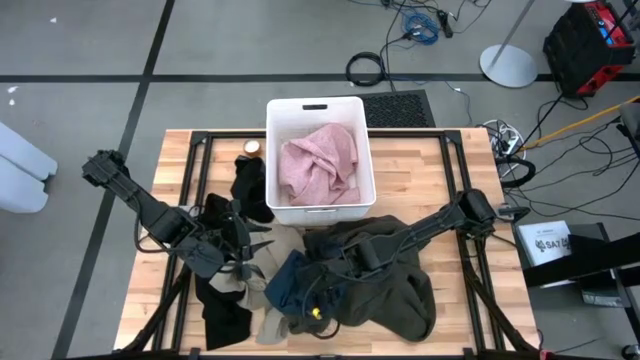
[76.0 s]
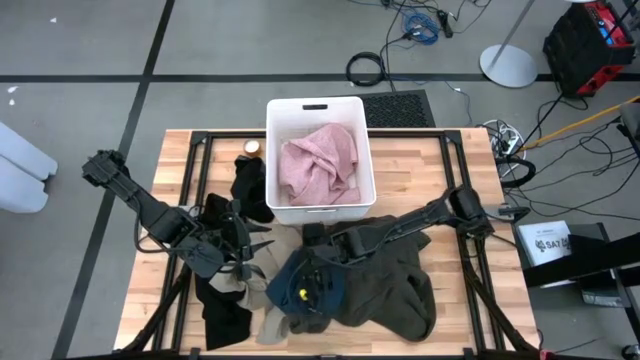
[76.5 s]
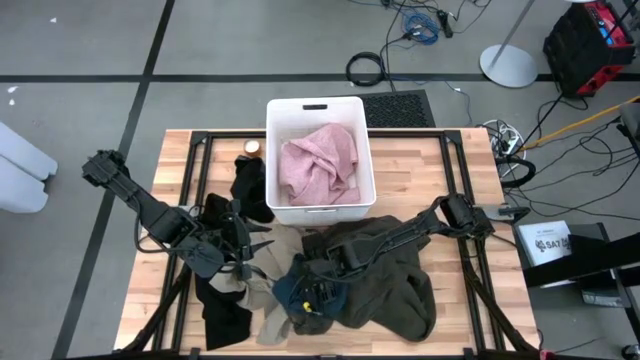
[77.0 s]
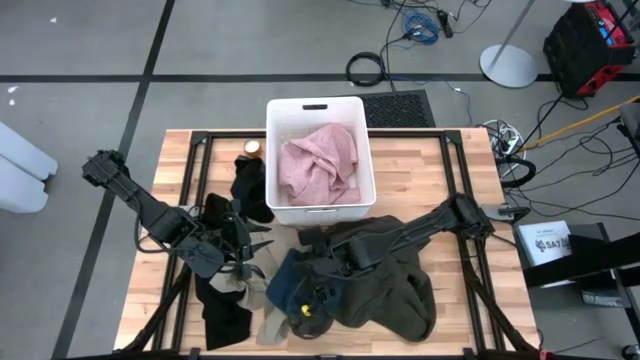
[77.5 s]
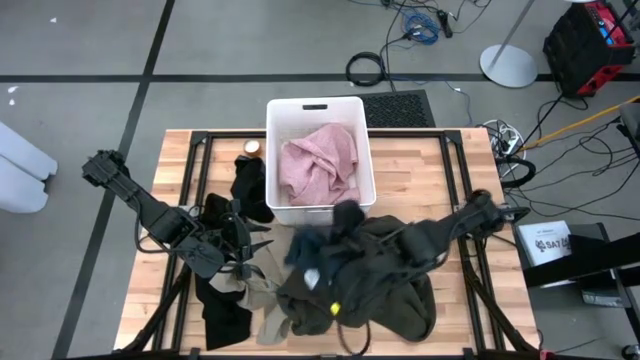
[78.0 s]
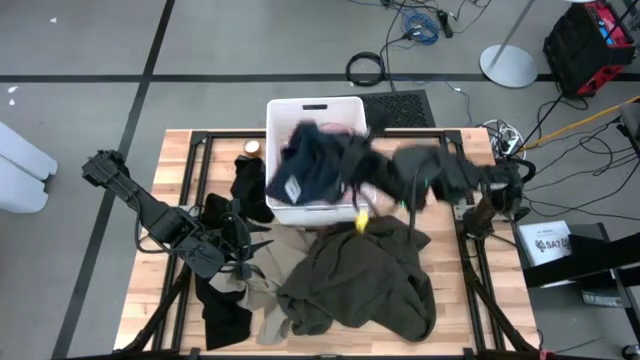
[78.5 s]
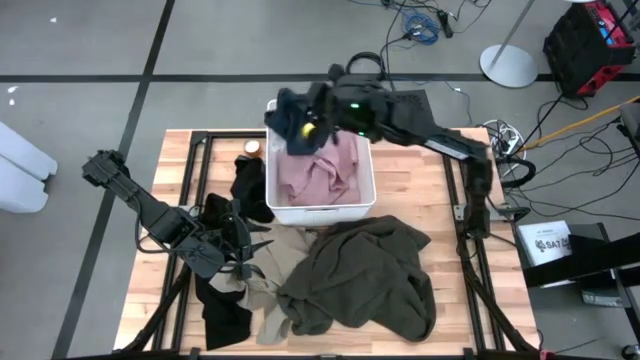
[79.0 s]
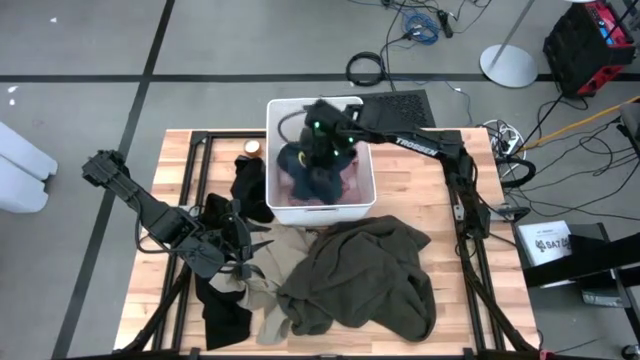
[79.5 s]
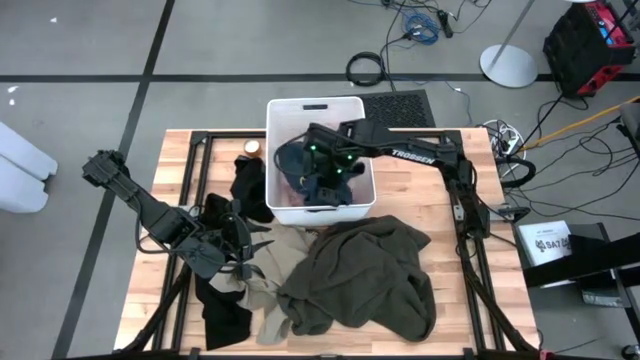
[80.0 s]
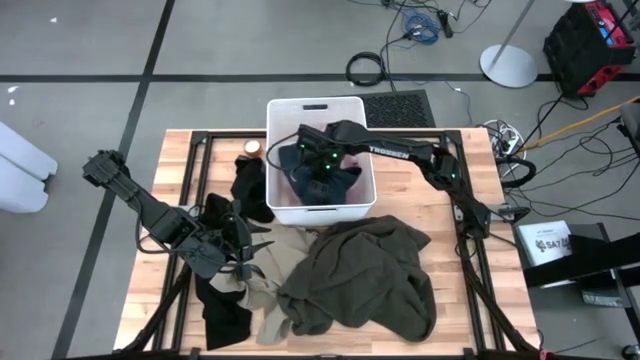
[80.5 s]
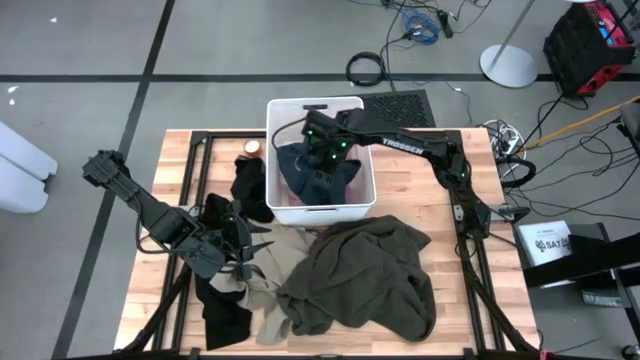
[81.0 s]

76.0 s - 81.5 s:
Task: Fold laundry
Put the folded dark blue short pants into the white laundry bin

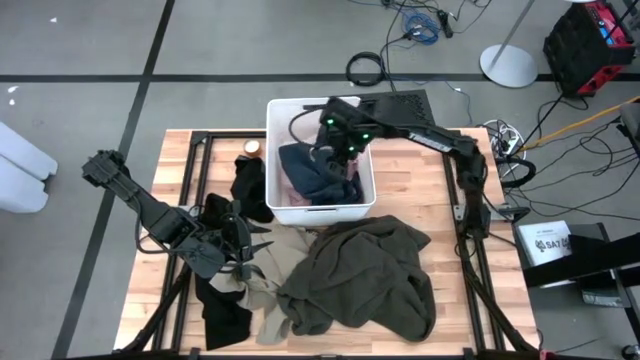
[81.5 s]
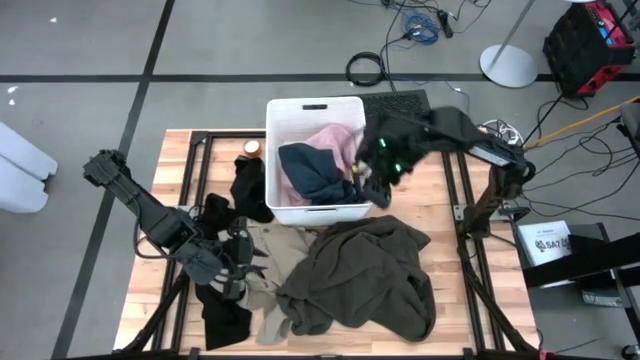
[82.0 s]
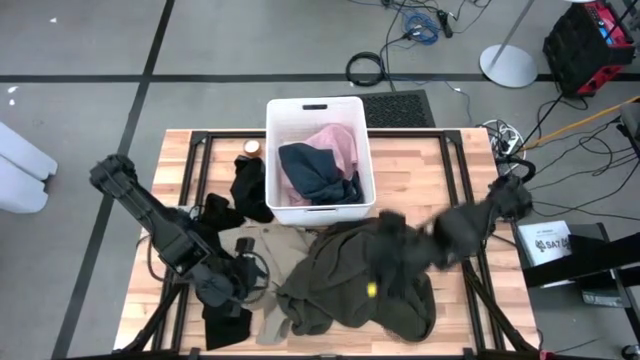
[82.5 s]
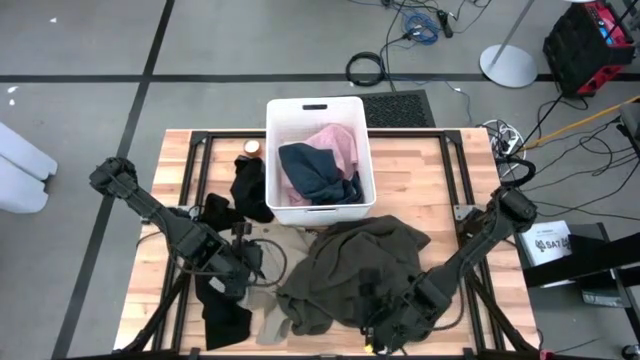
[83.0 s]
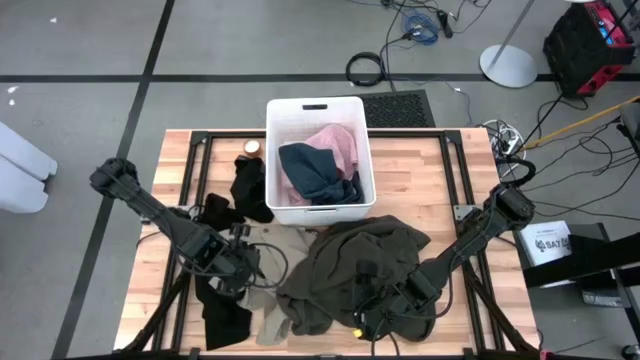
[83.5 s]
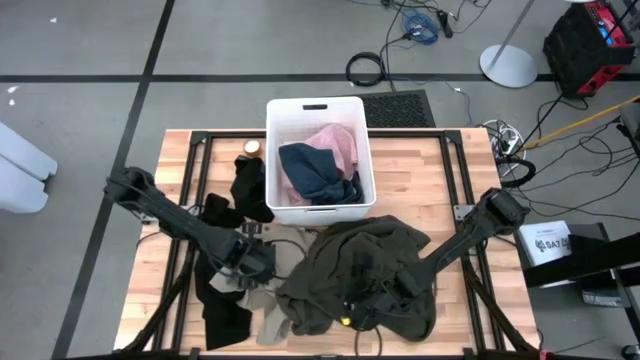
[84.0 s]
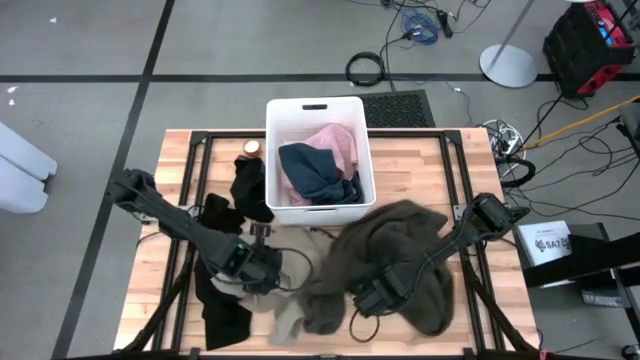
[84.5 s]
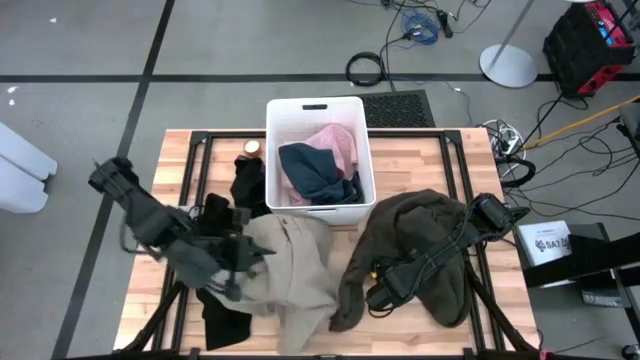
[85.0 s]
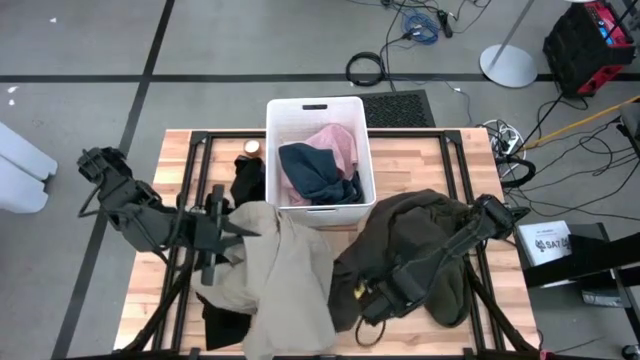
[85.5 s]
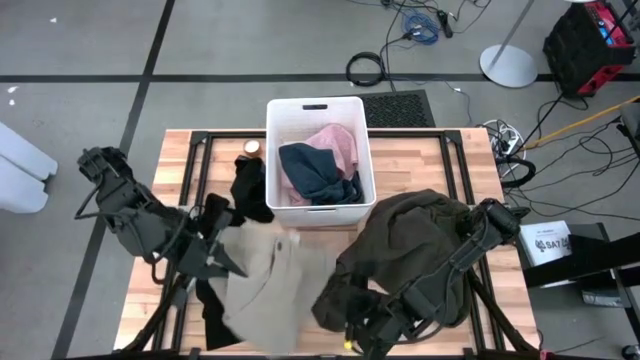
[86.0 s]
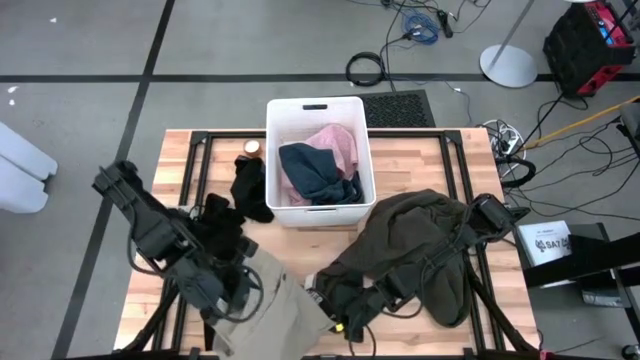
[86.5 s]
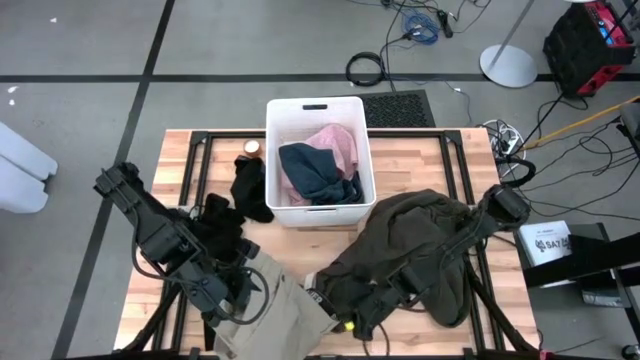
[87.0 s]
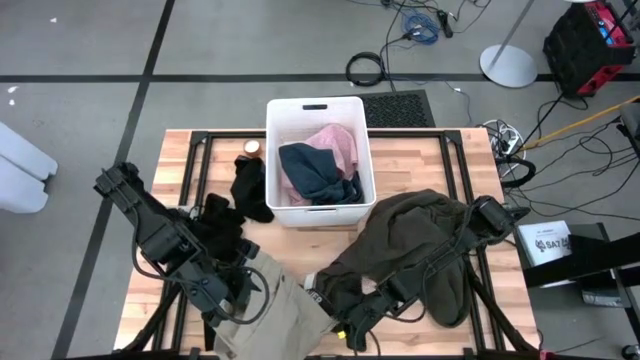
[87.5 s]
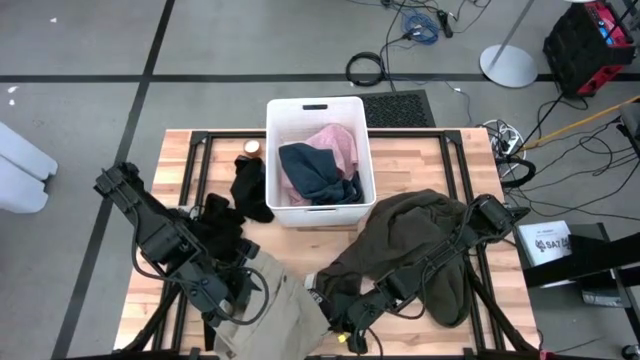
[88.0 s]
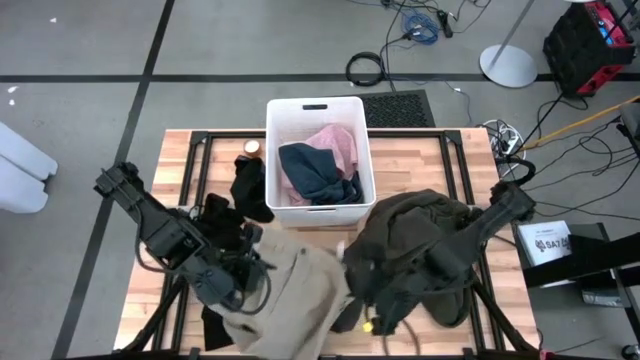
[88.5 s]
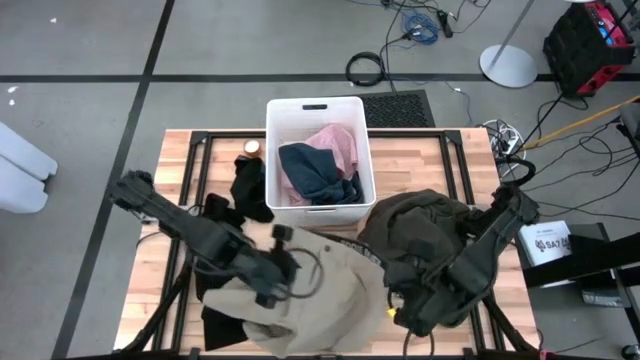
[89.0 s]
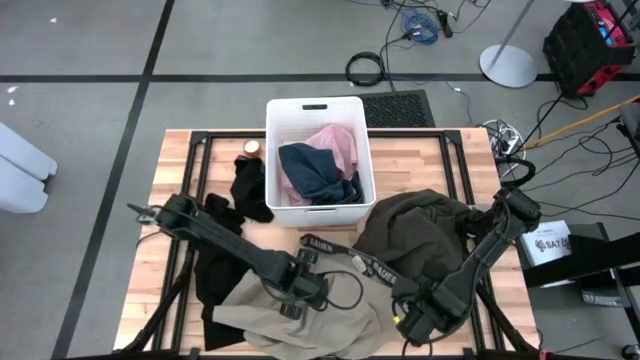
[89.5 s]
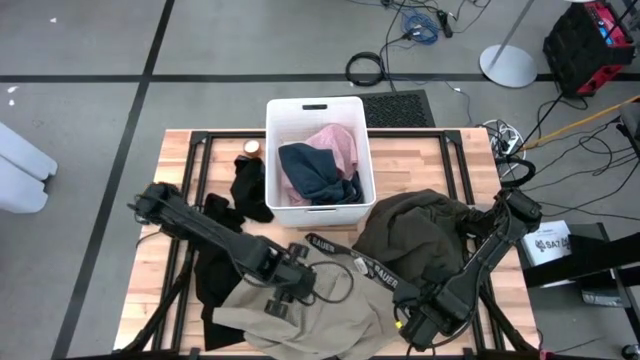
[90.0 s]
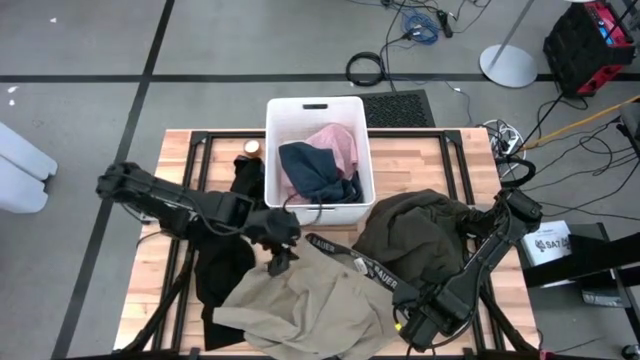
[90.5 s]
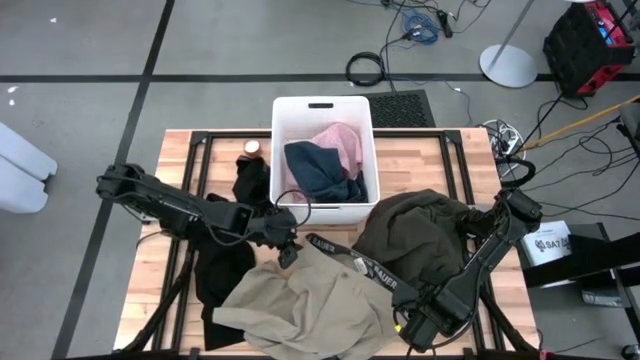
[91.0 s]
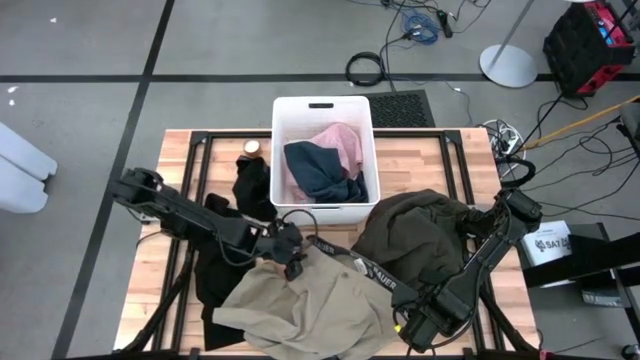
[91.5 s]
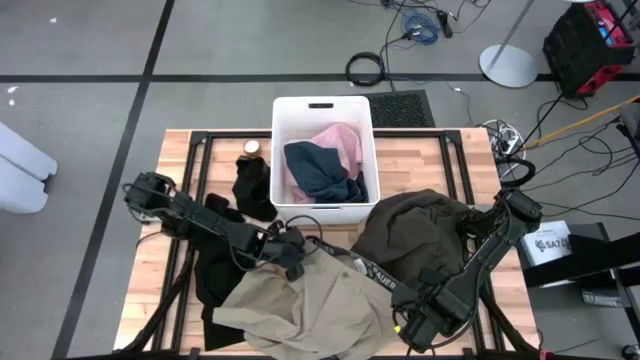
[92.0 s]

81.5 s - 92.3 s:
Fold the light brown short pants

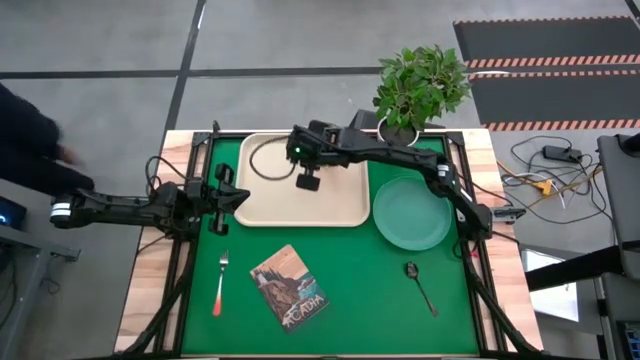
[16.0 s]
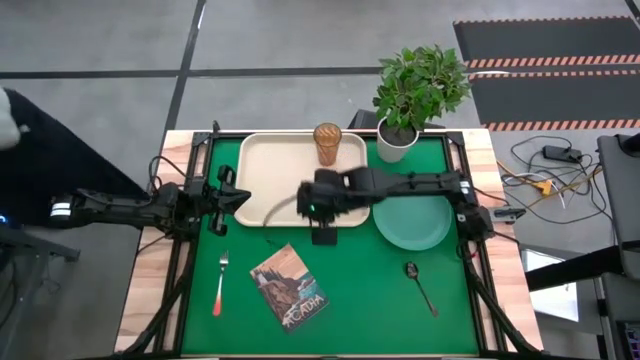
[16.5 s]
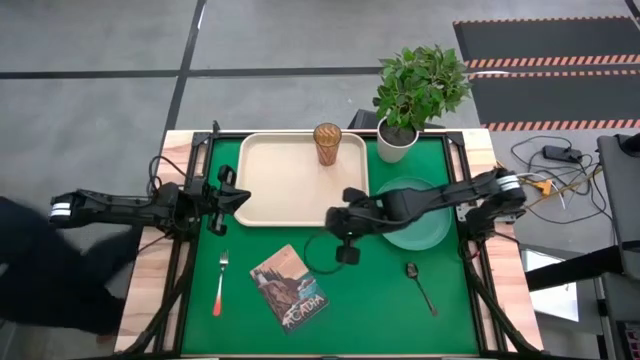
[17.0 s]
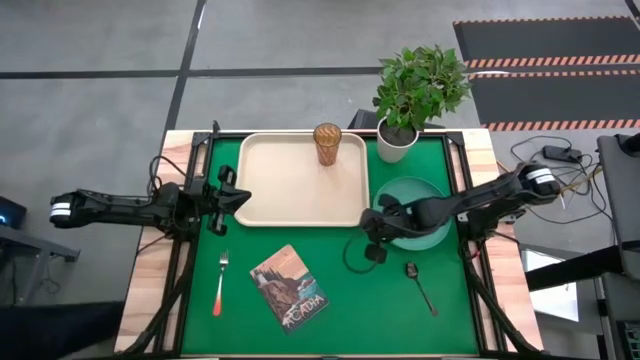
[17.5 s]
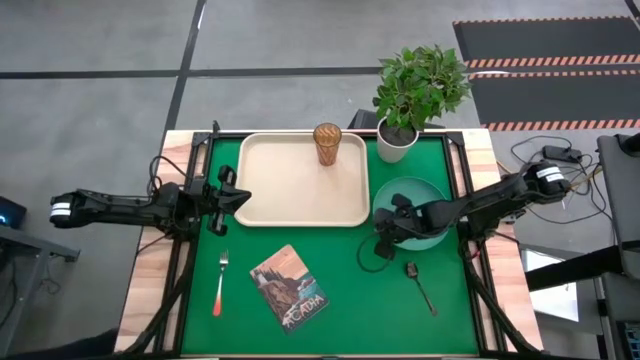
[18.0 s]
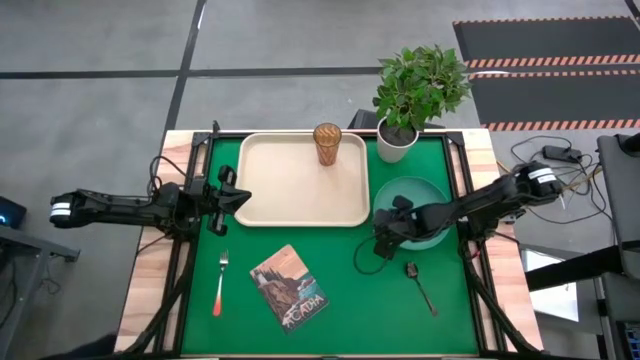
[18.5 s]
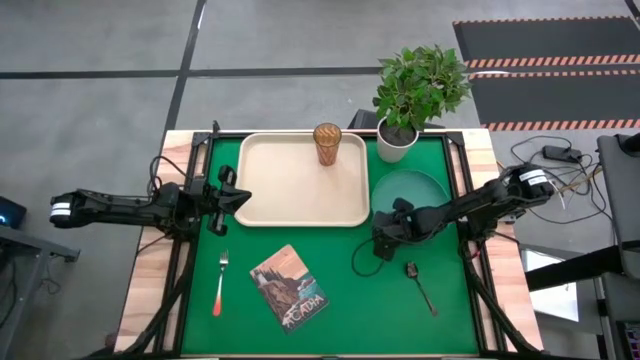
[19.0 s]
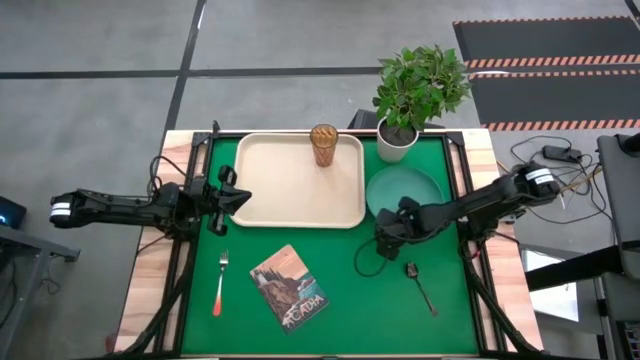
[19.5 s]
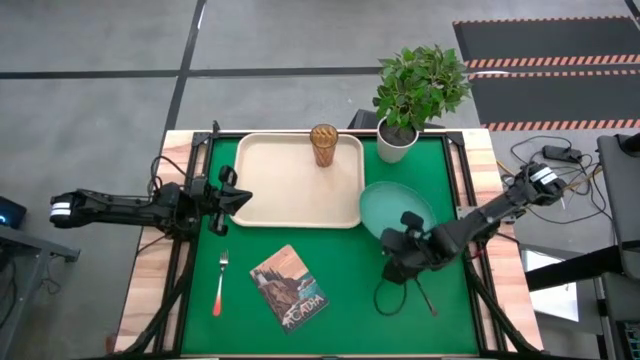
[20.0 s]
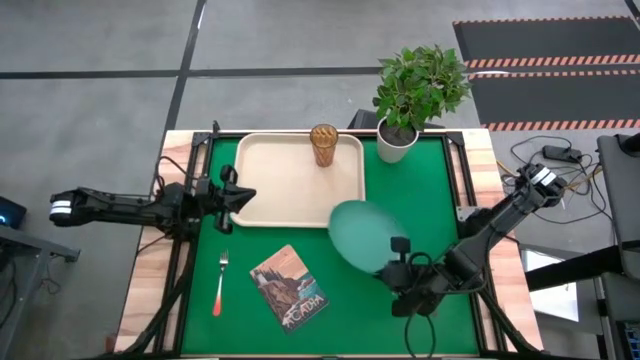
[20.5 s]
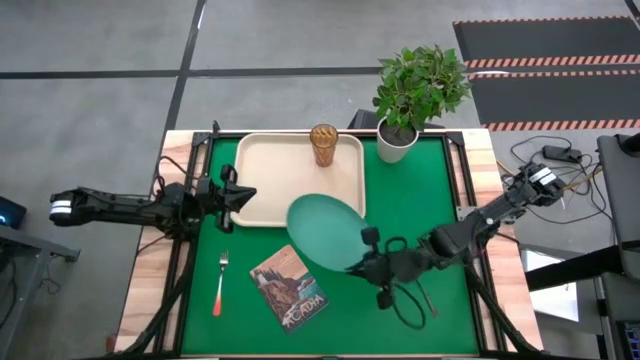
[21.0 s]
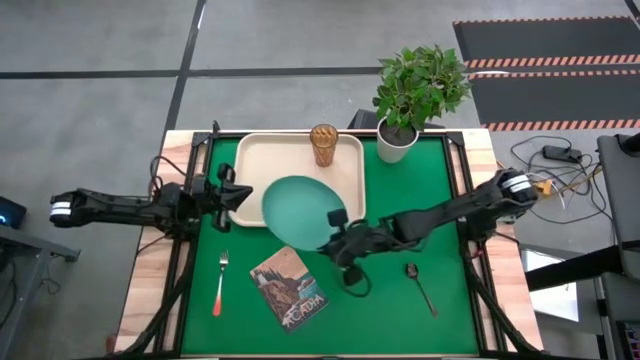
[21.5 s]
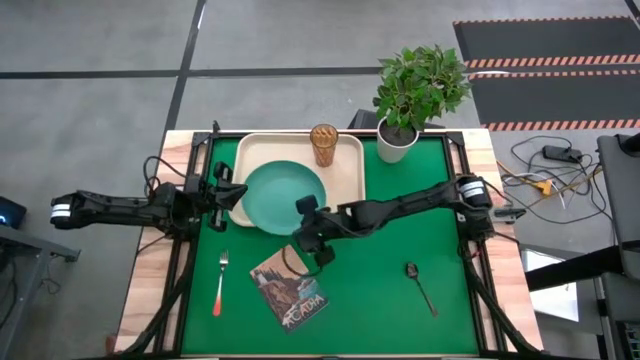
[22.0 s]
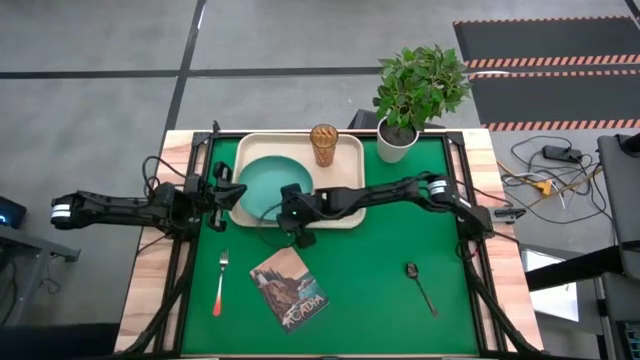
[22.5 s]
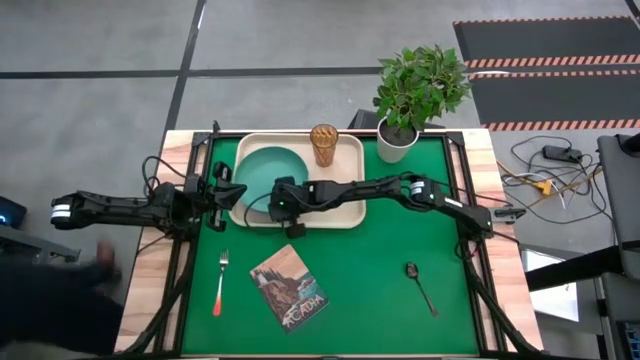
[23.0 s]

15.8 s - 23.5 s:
Task: Pick and place plate/cup/fork/spoon on tray
Put the green plate on the tray to the bottom left of the brown cup
